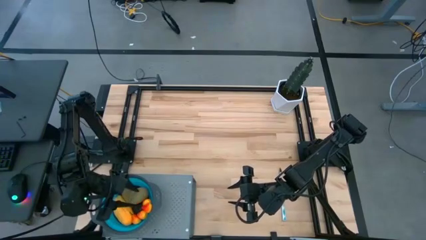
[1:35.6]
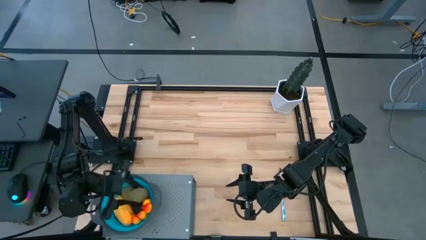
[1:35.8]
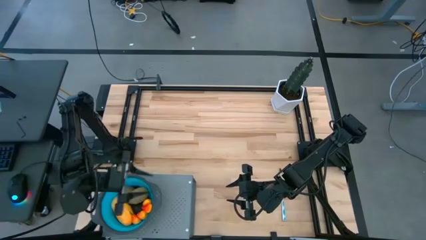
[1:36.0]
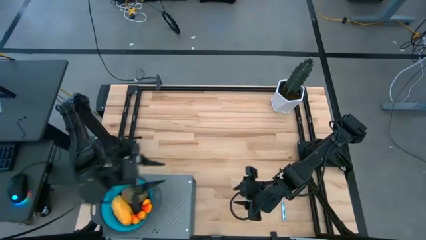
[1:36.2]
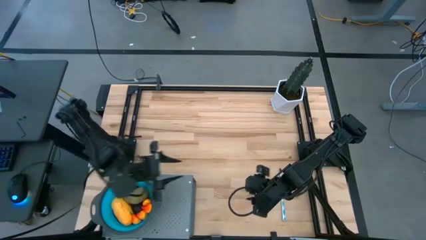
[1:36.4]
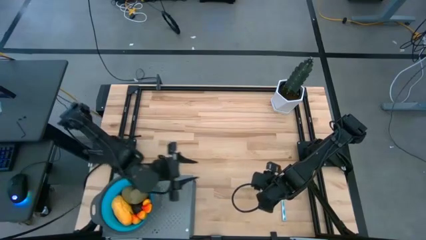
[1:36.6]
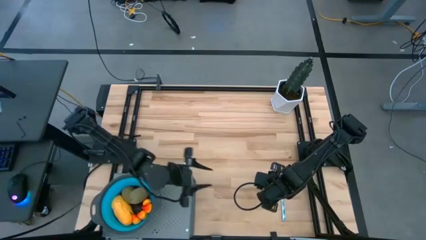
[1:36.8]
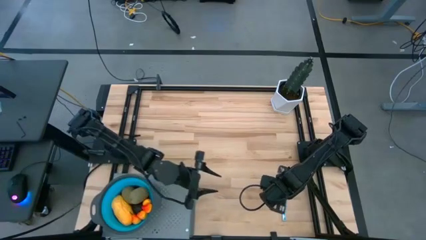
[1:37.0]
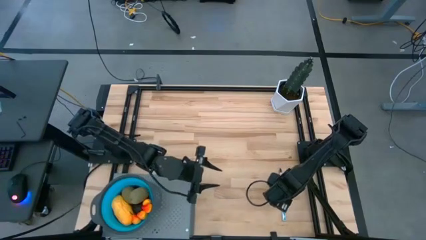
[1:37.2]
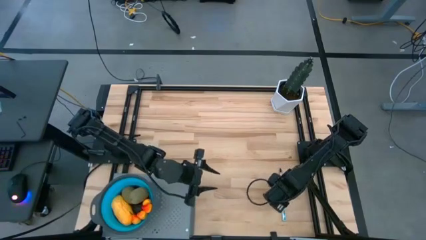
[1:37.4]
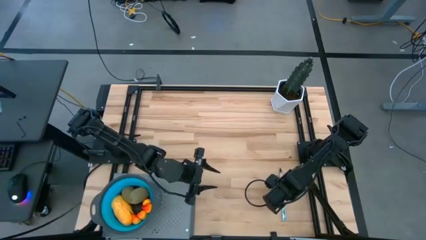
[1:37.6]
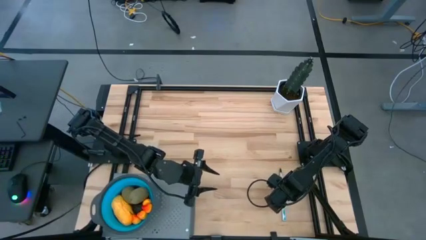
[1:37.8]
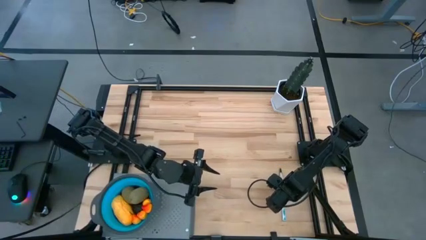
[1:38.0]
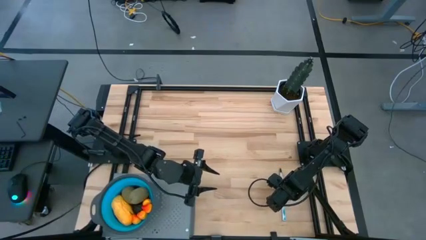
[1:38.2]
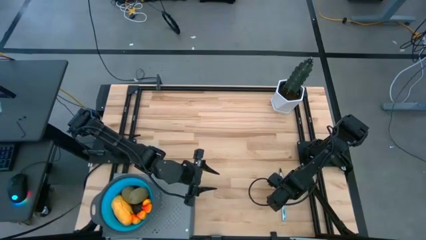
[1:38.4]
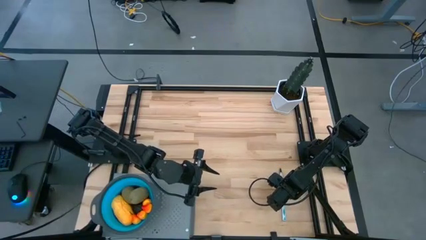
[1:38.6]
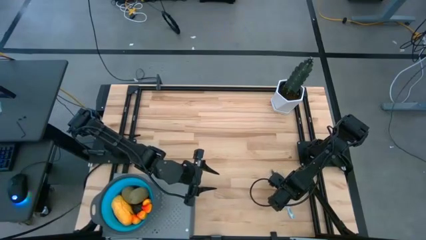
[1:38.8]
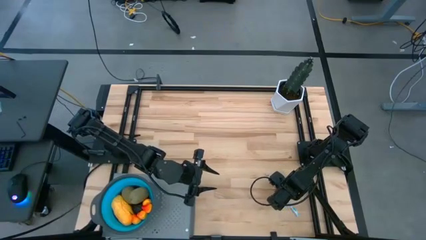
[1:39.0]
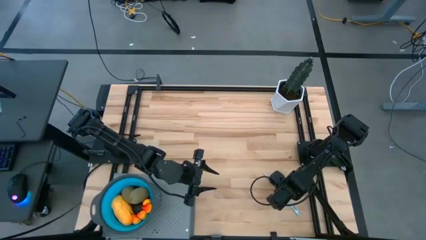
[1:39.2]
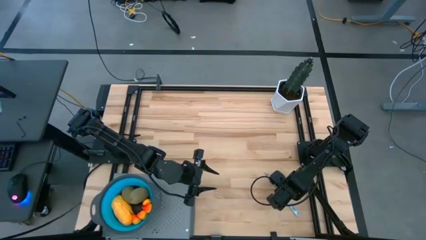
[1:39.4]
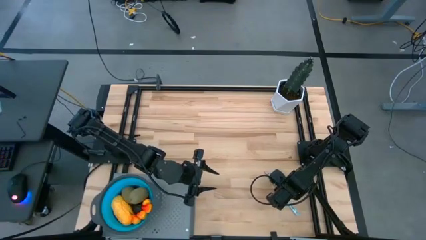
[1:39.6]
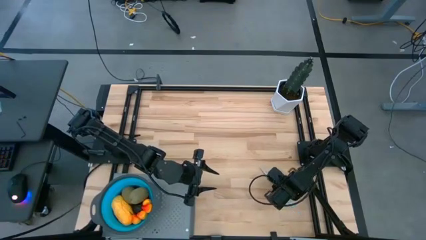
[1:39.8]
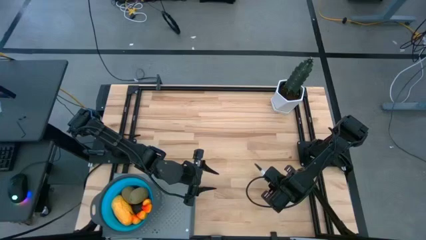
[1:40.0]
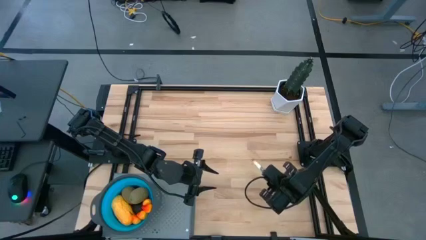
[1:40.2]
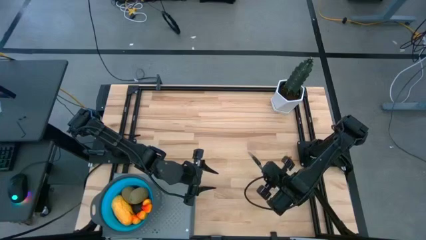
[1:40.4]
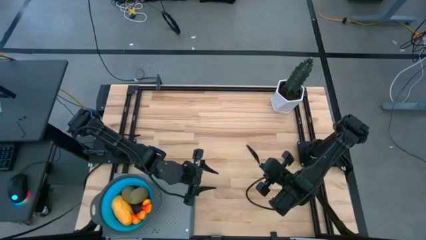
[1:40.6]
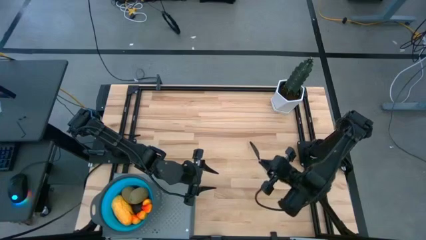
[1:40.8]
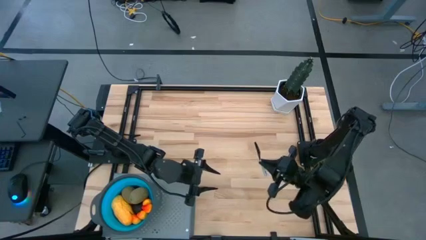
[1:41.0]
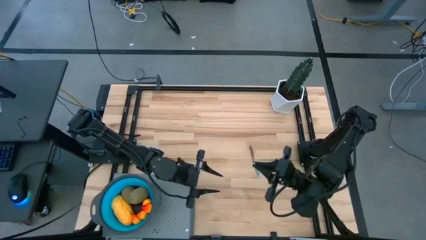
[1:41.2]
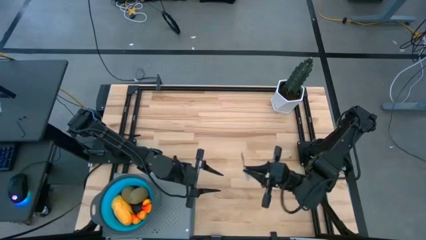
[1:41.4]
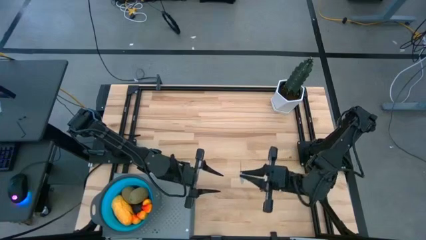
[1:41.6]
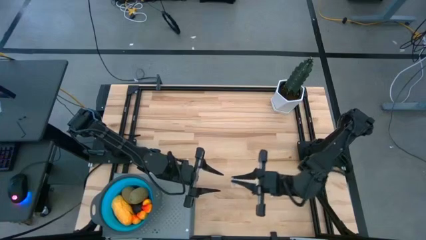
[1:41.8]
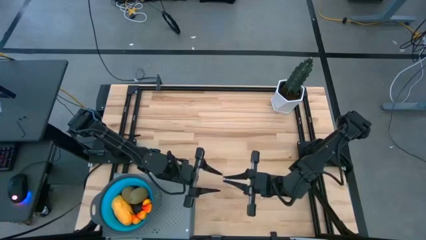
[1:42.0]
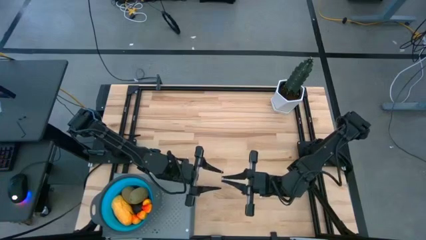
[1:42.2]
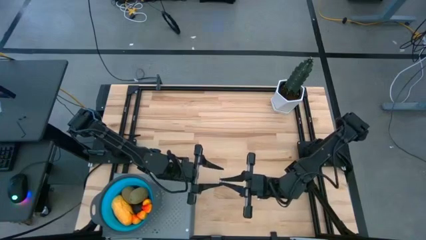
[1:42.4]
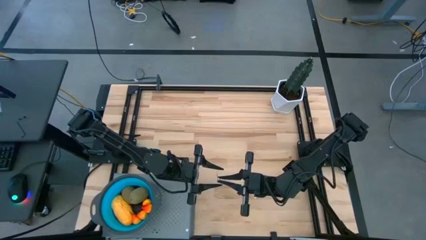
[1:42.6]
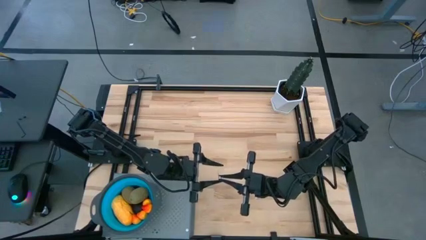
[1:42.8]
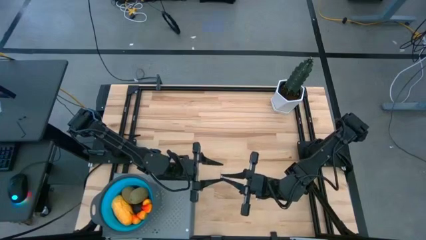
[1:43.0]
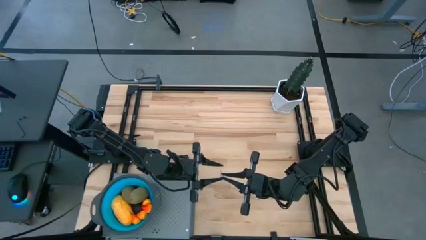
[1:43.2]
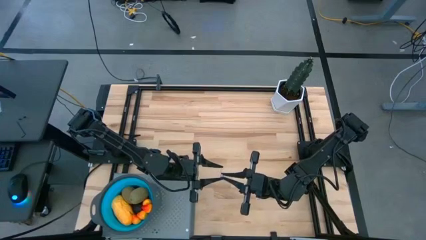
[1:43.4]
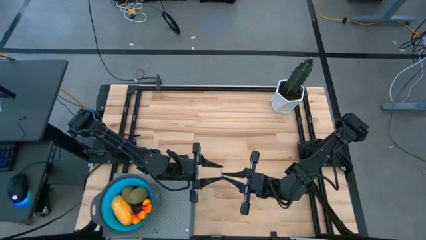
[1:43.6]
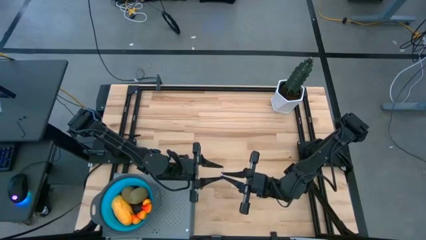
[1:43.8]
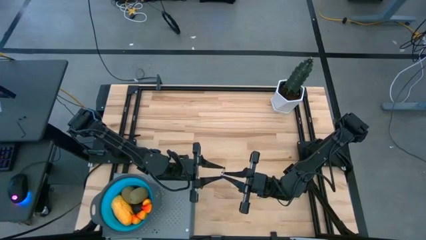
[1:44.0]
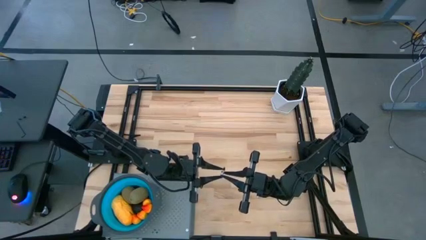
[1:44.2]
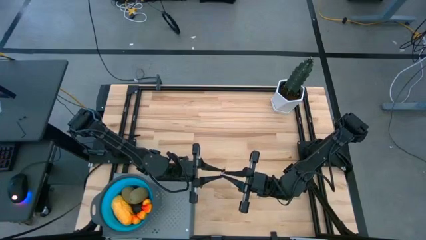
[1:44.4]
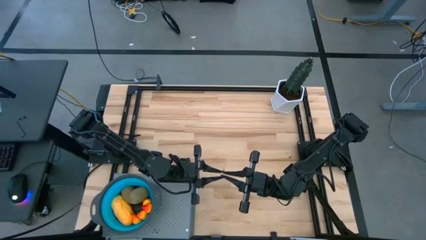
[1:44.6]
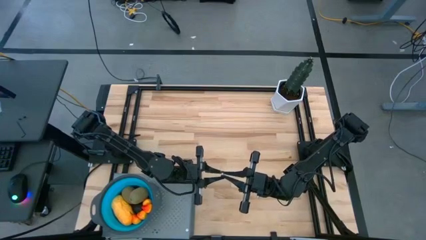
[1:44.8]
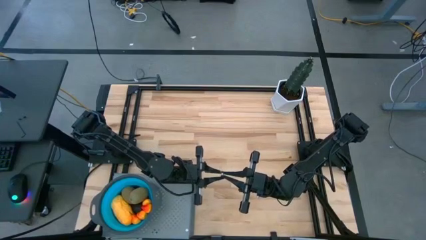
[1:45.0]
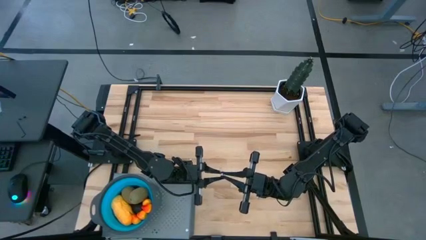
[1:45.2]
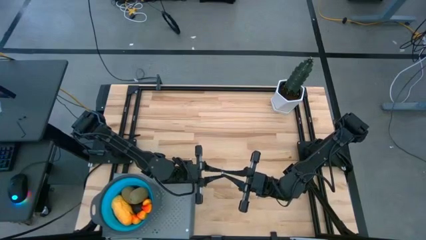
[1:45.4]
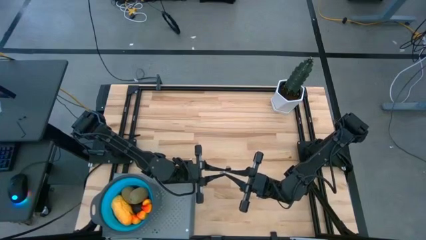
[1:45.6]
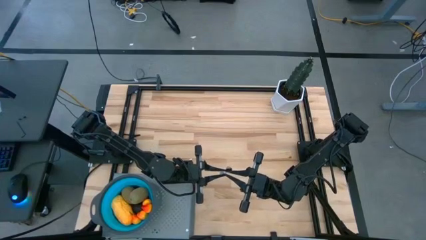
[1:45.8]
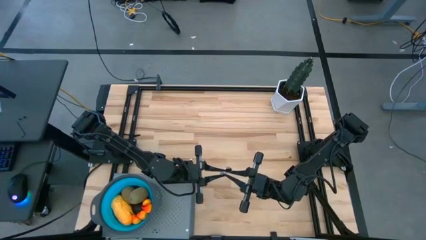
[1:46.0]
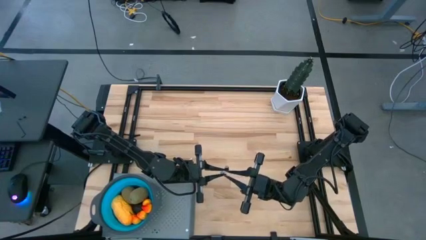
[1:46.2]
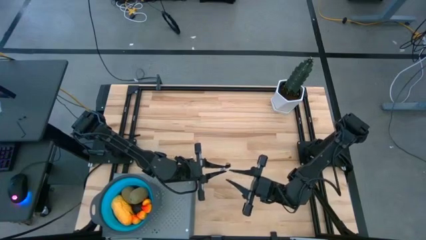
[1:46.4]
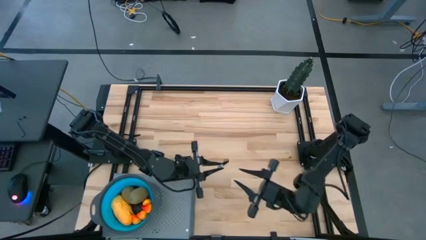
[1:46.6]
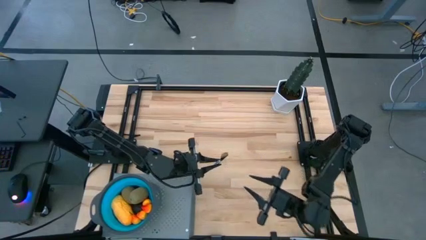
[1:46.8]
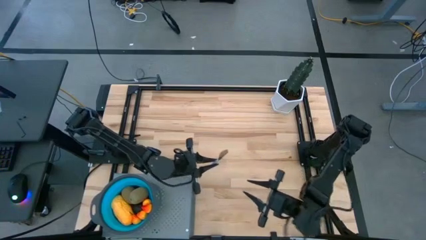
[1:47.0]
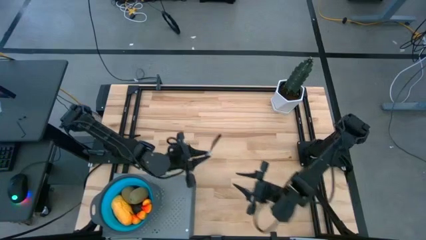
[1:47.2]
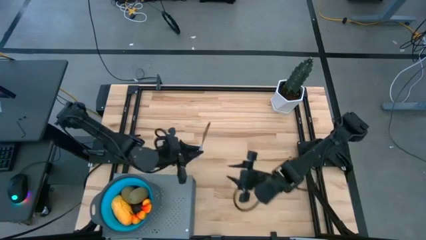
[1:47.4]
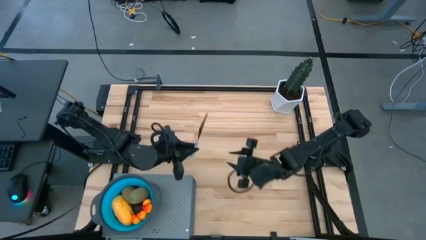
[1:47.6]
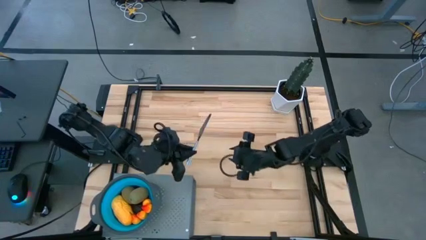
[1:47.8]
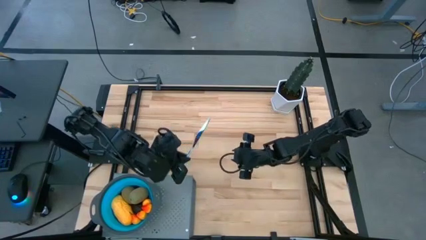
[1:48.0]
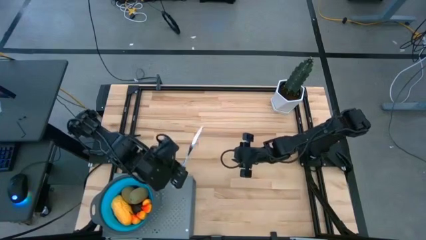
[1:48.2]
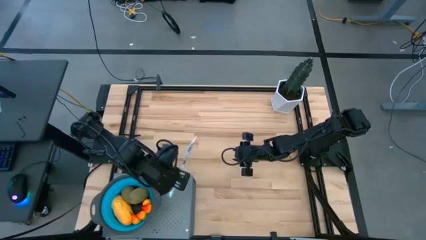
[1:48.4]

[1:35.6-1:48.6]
Task: Pick & Place Fruit
Put the knife on the shelf

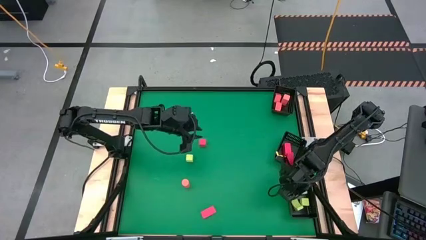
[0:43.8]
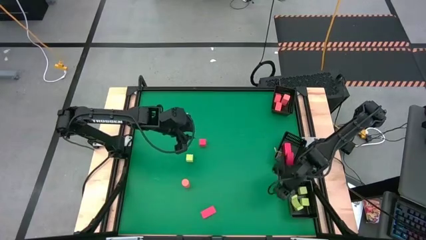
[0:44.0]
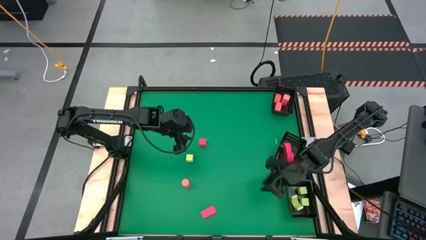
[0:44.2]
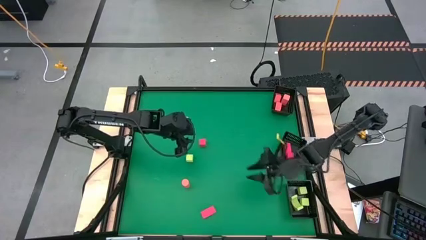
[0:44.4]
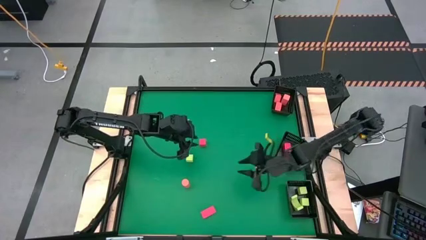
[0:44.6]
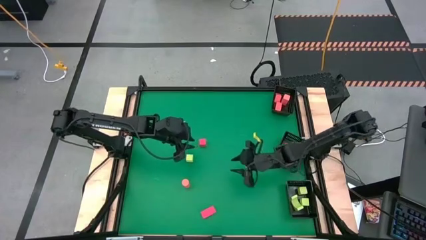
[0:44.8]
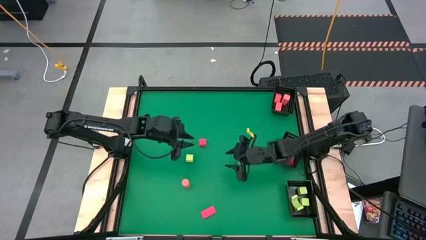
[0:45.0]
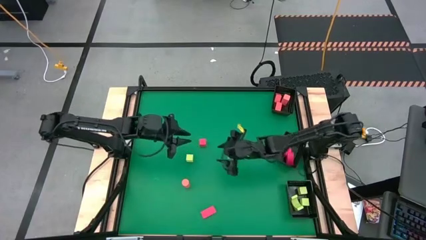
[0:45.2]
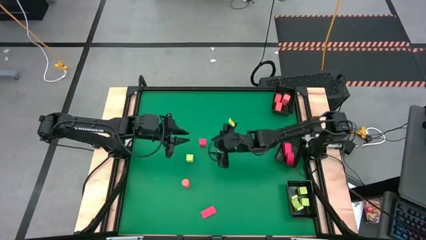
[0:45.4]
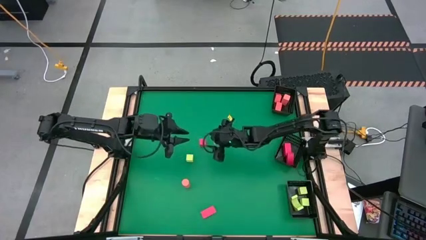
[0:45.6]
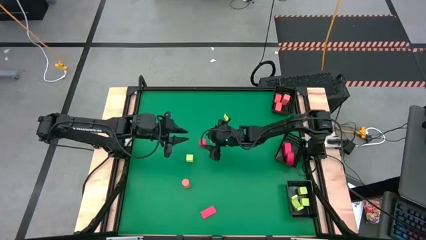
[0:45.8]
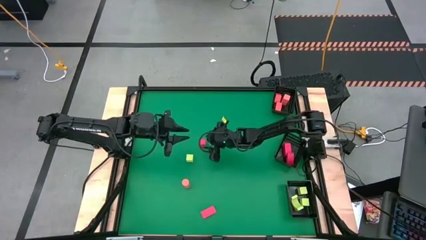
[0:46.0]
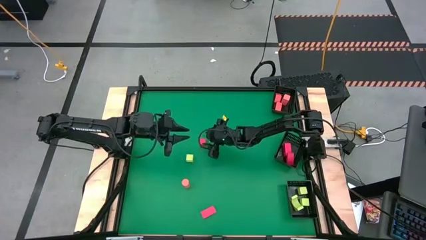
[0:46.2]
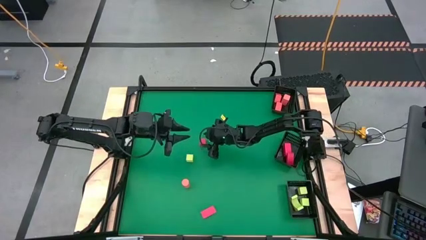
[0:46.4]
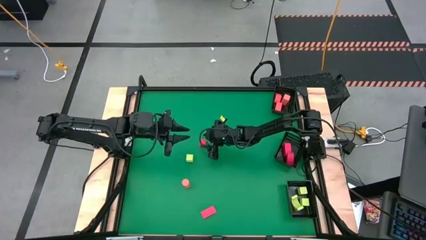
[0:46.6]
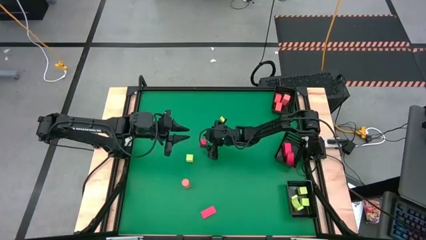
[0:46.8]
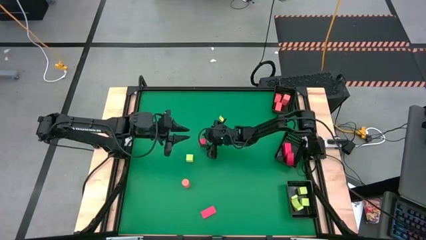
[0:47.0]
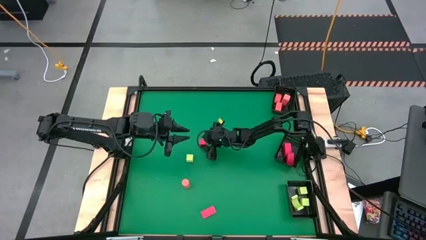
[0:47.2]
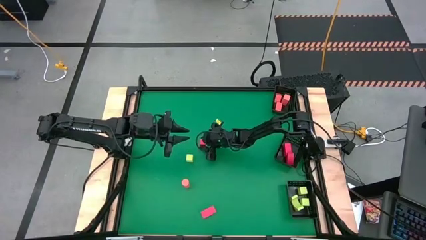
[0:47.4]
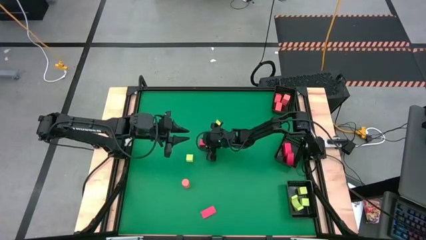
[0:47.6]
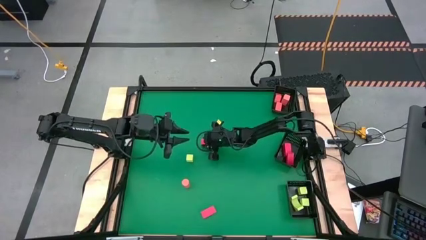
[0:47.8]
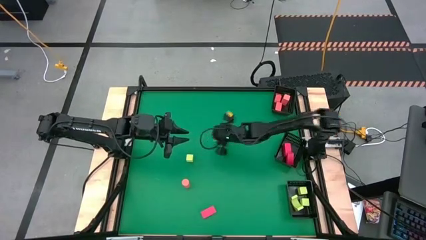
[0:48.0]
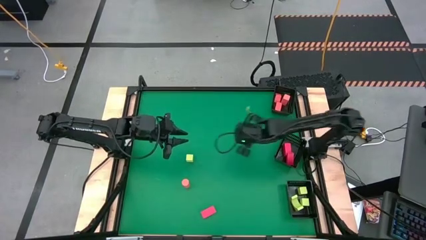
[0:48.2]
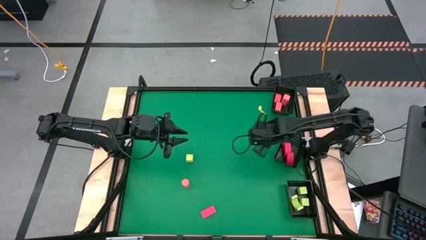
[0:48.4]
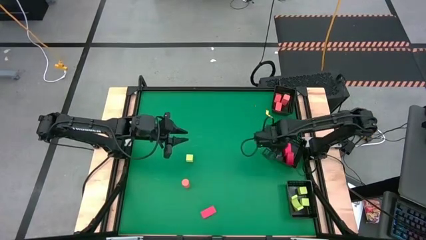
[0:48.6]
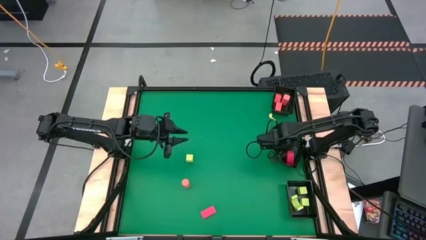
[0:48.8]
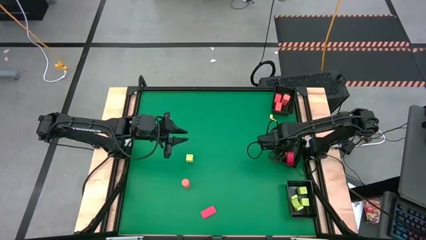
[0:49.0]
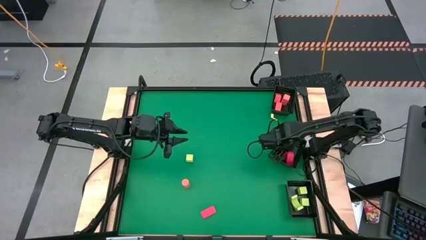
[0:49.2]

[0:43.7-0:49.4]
Task: Sort & place blocks by color
Put the top red block into the middle right black bin
